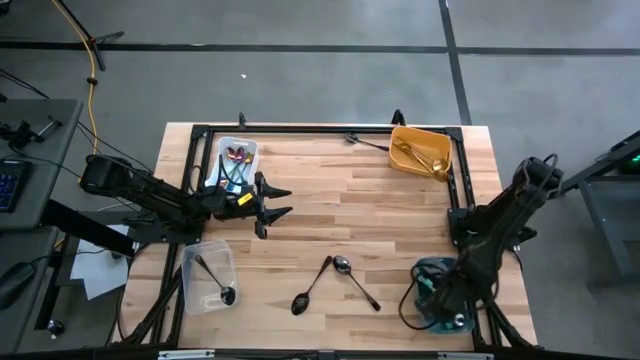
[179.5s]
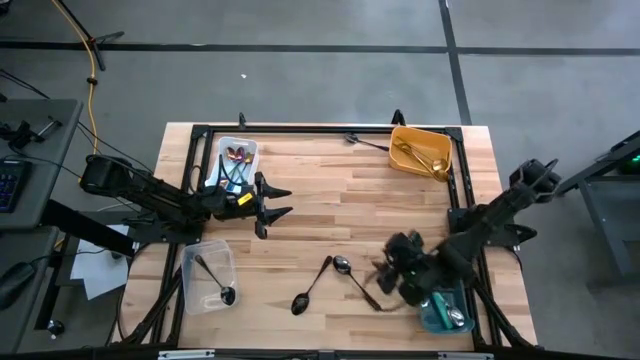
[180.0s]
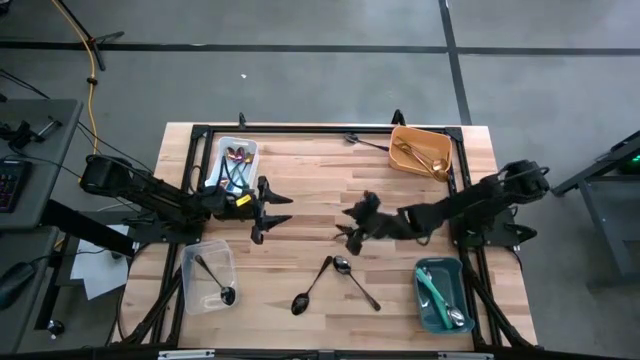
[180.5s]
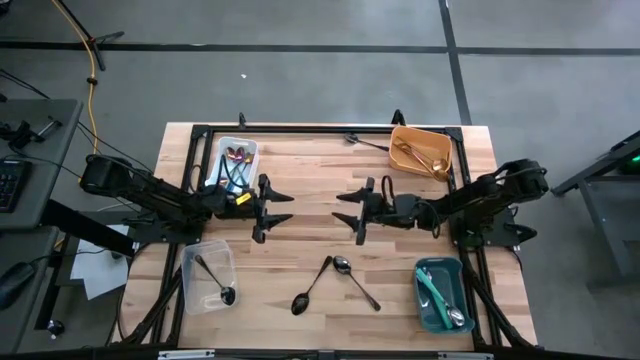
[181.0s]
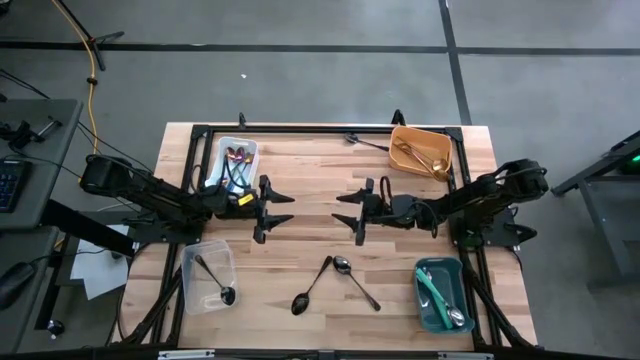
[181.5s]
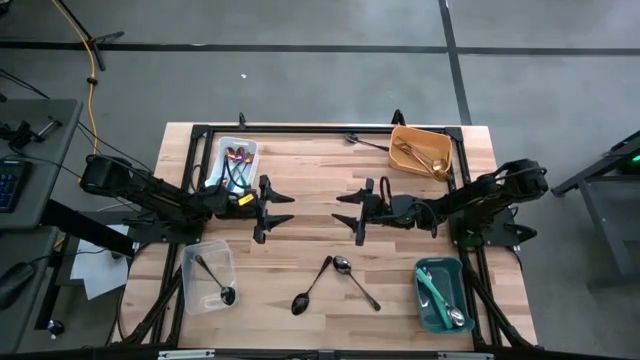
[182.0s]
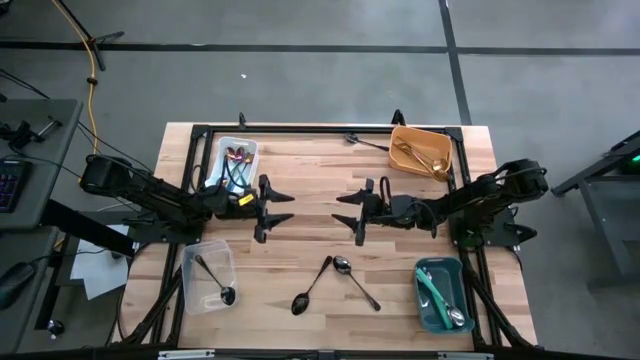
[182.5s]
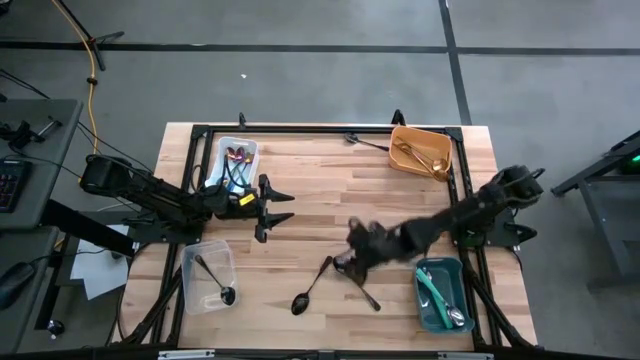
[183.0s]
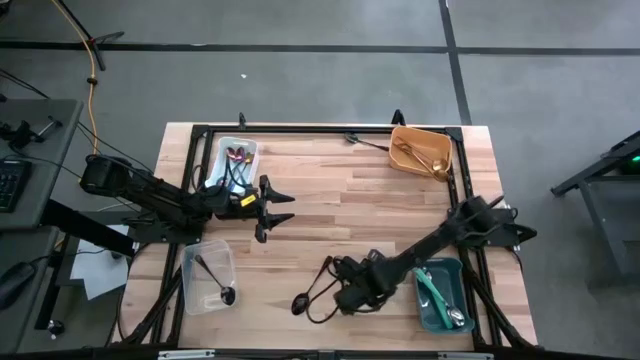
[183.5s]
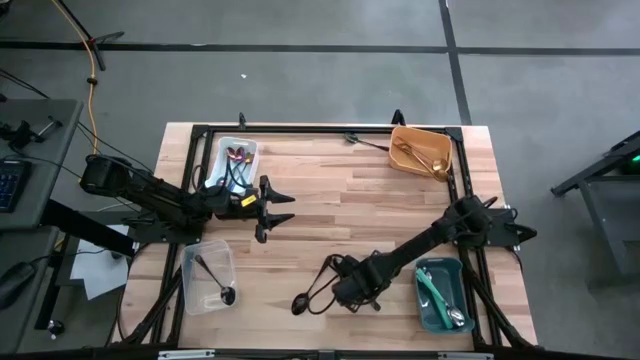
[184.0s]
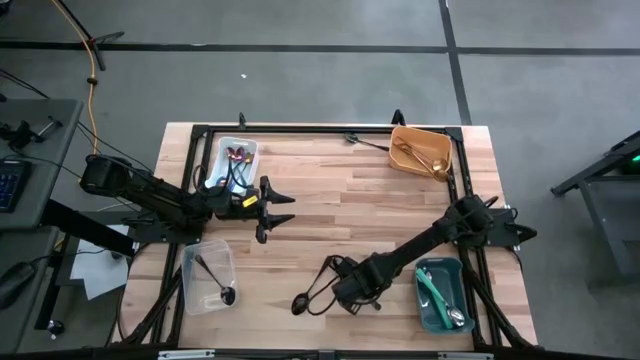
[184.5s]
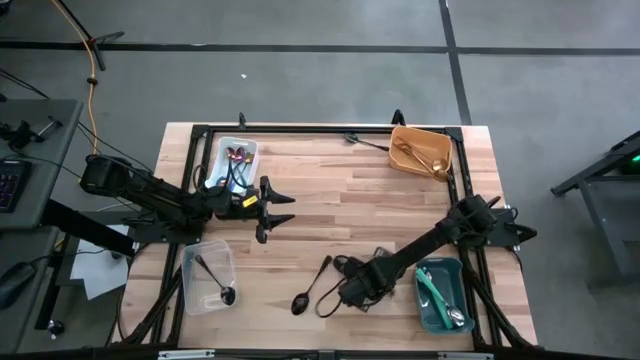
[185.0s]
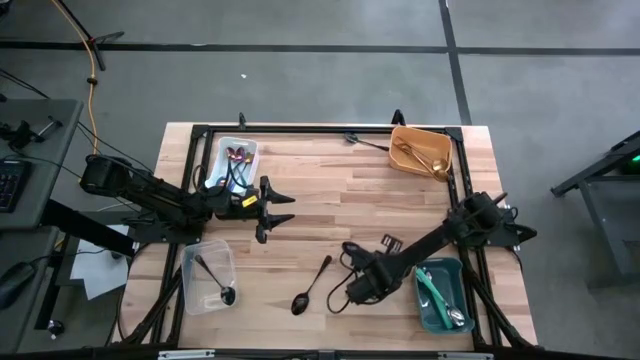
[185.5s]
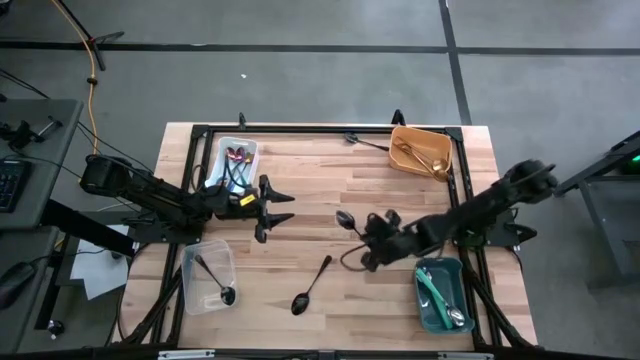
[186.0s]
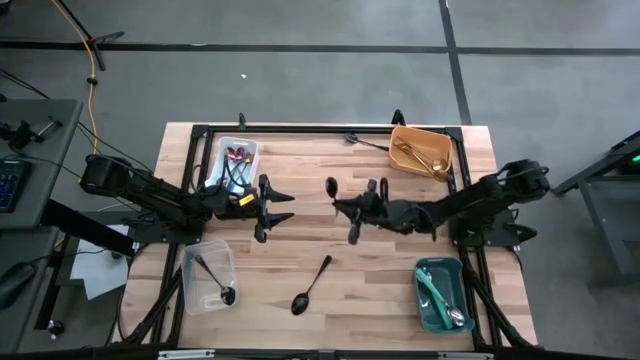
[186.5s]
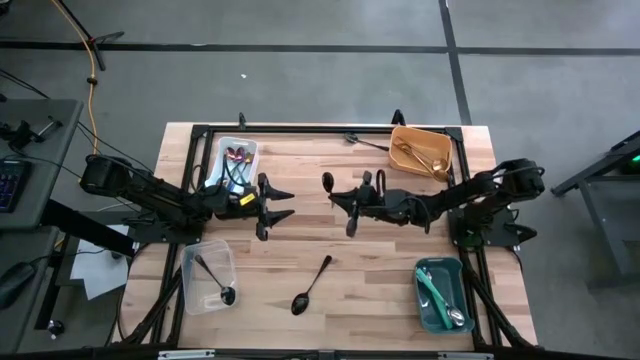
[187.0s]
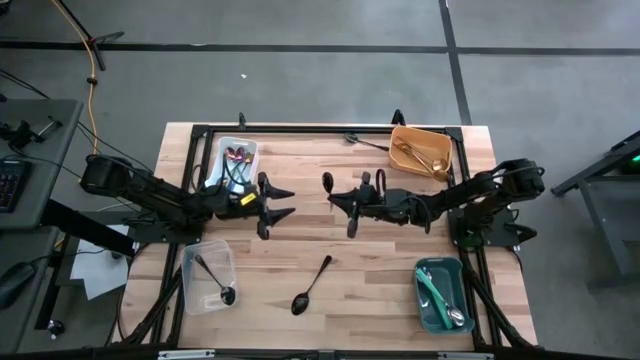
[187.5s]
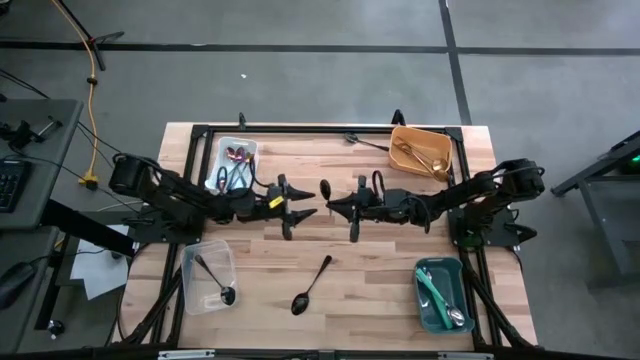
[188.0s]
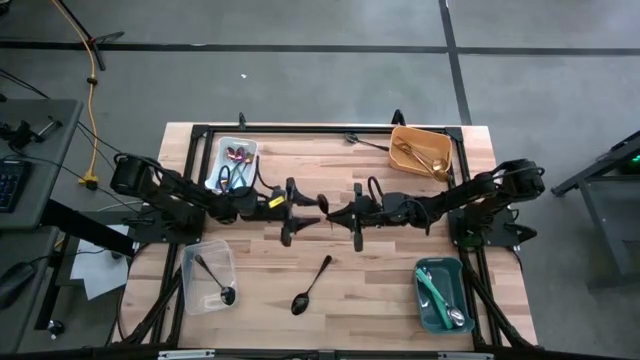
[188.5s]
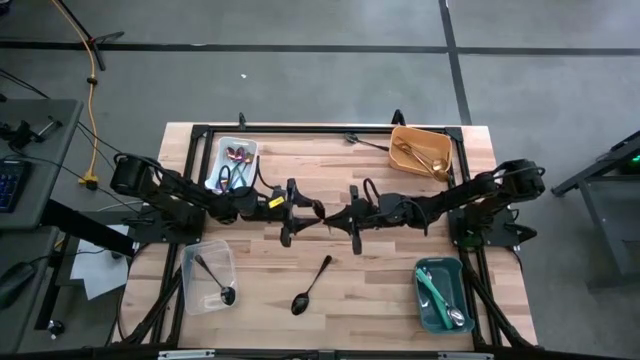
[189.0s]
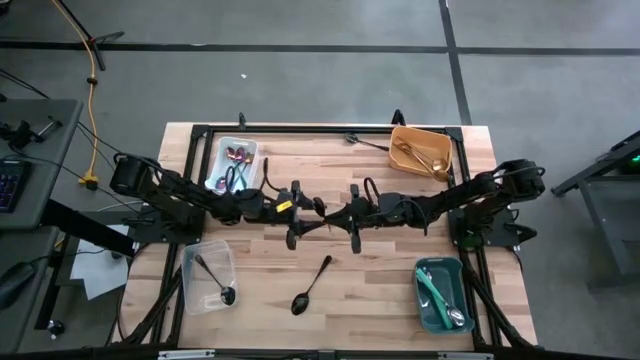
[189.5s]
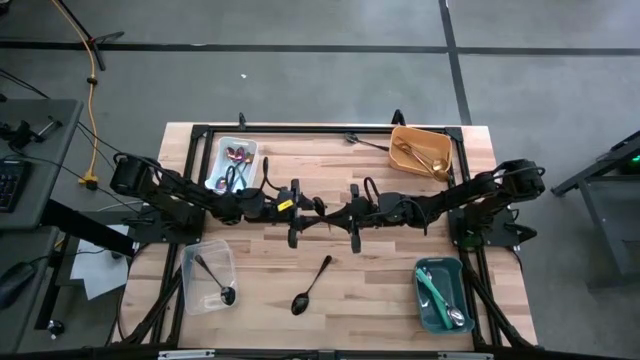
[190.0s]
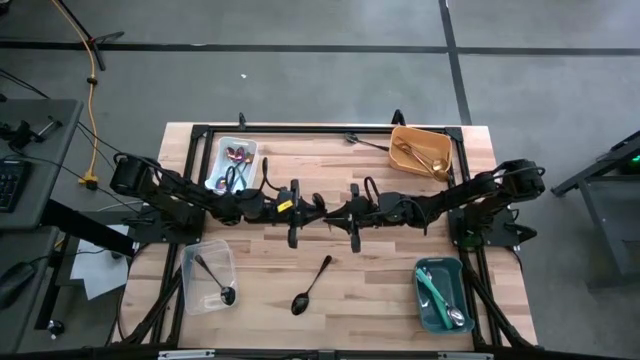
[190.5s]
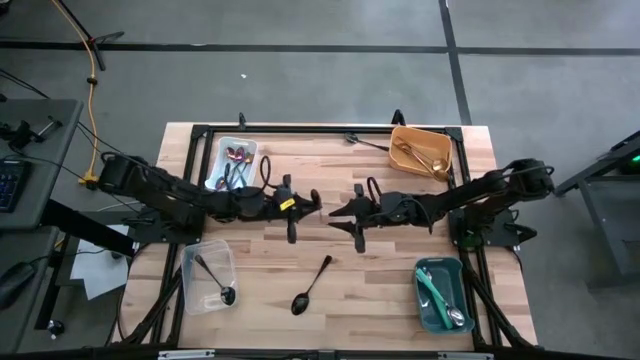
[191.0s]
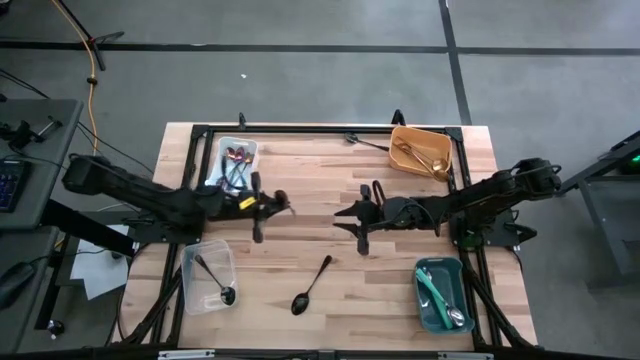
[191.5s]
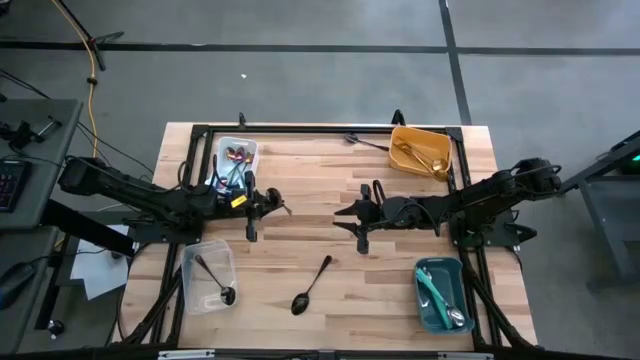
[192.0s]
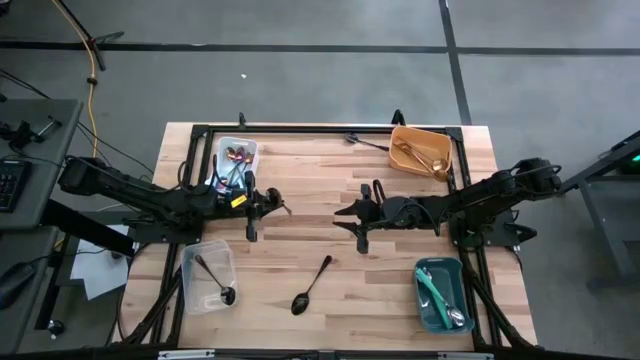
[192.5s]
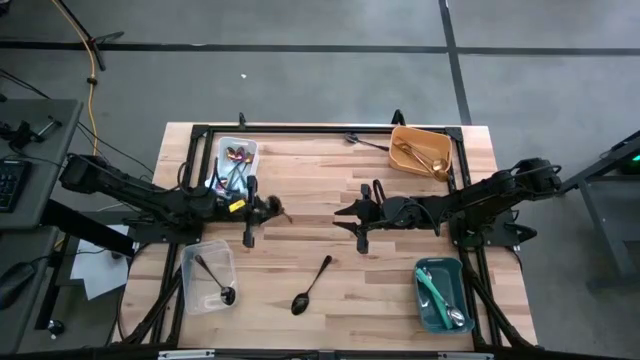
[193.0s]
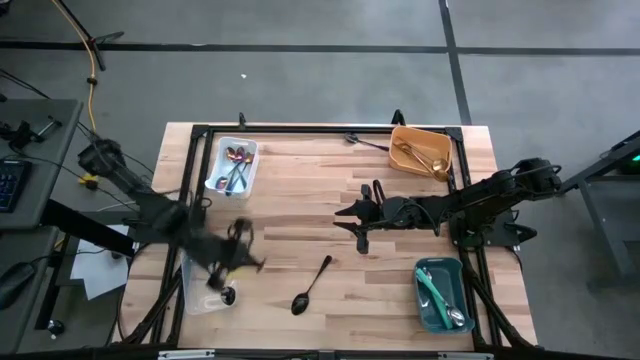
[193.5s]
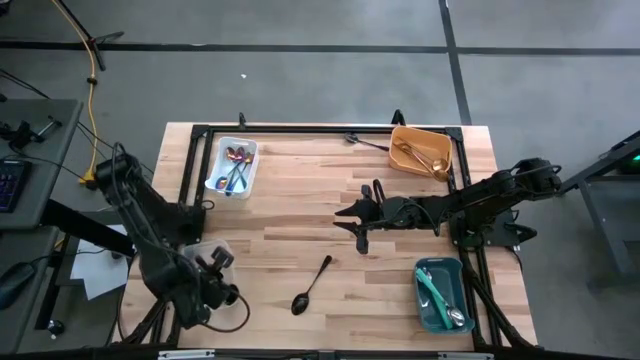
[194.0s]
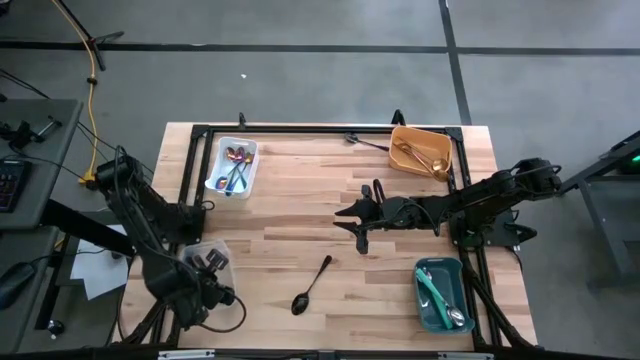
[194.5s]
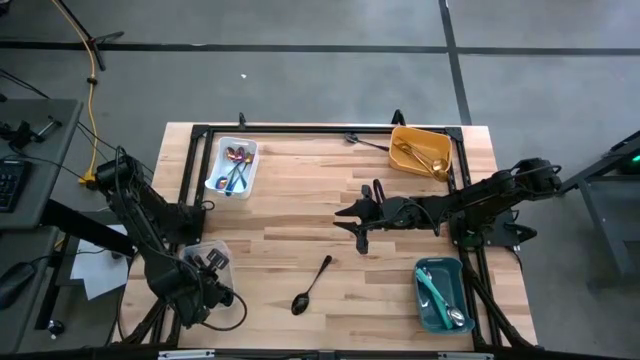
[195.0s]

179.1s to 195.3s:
Task: Sort silverware by color (type)
Put the black spoon into the transparent bin

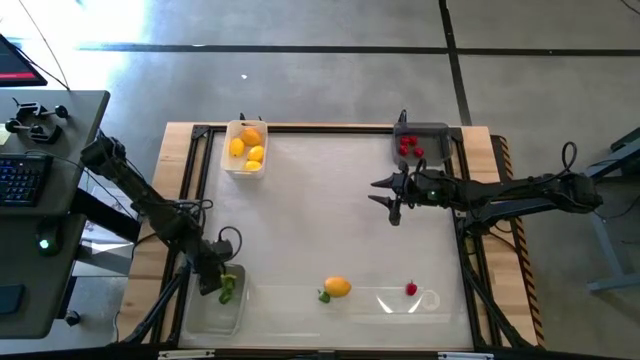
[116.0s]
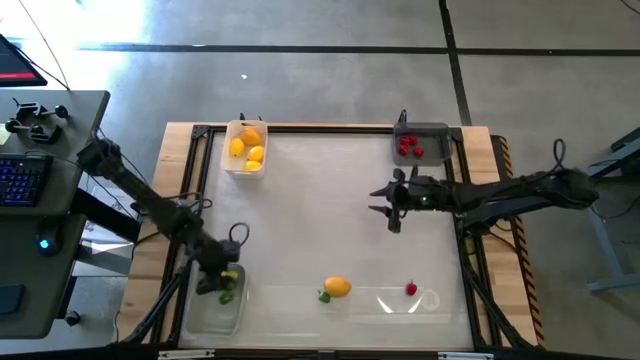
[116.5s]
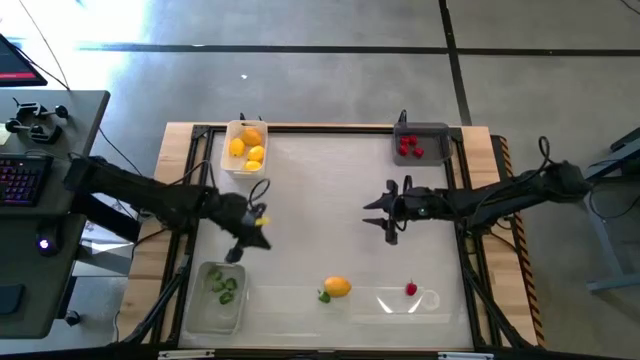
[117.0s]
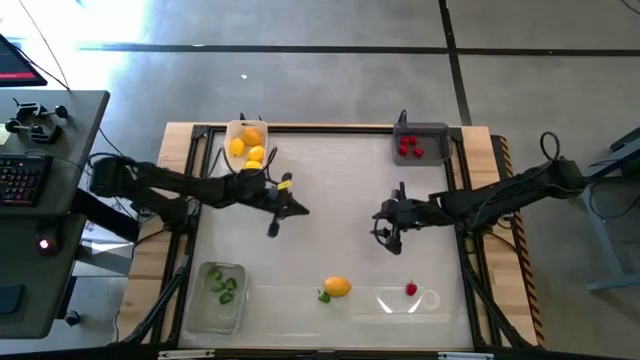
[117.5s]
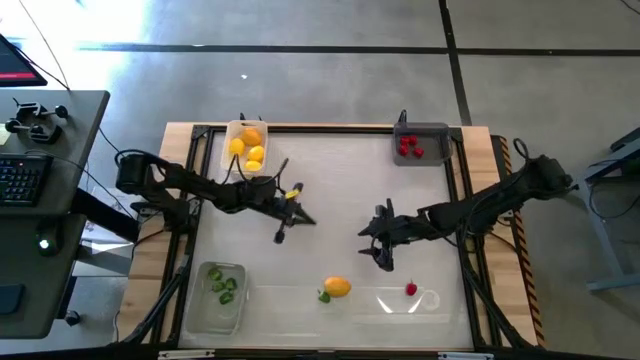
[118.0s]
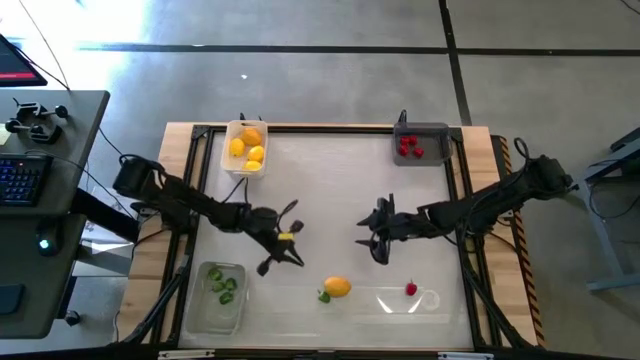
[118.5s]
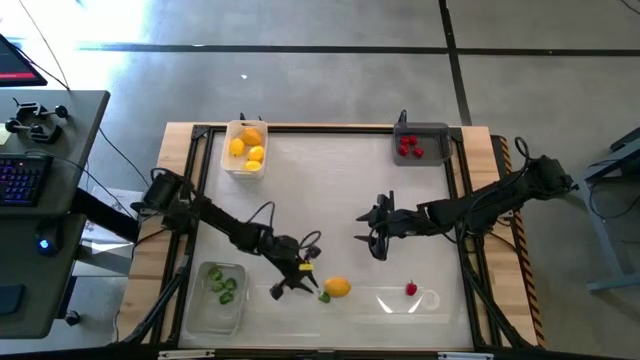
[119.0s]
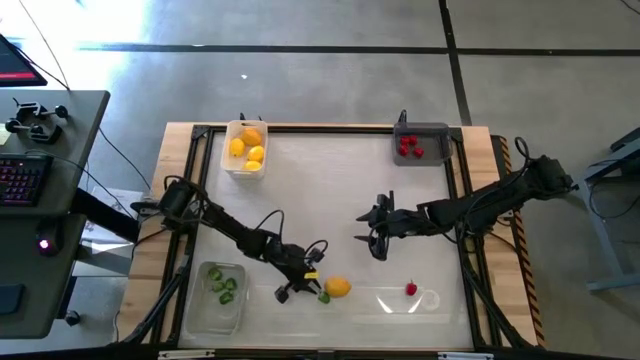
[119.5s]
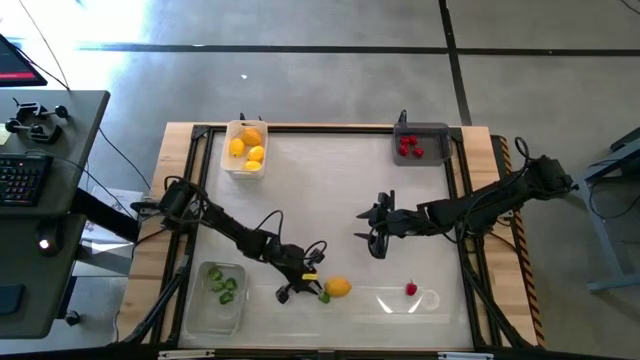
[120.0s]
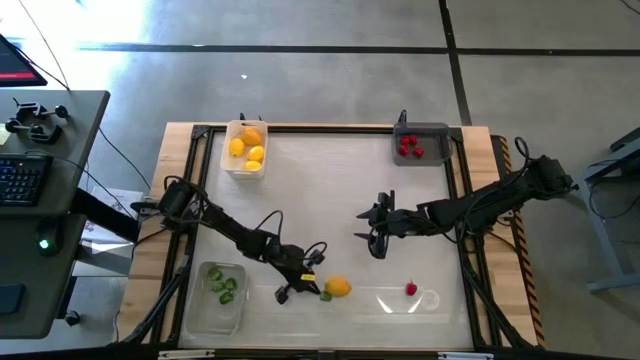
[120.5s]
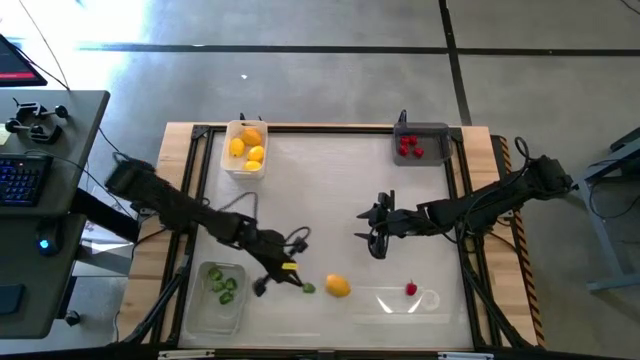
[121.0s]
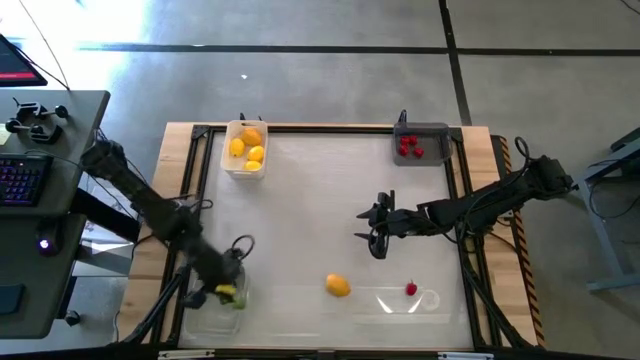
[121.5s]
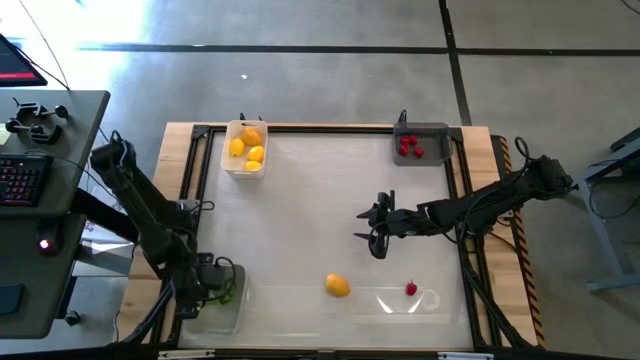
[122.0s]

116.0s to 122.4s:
Task: Sort produce into baskets
Put the green bell pepper into the gray bin
